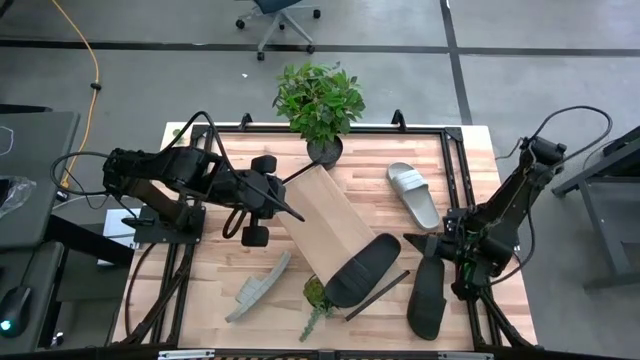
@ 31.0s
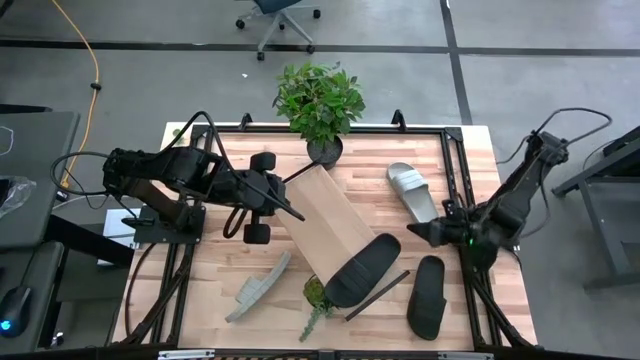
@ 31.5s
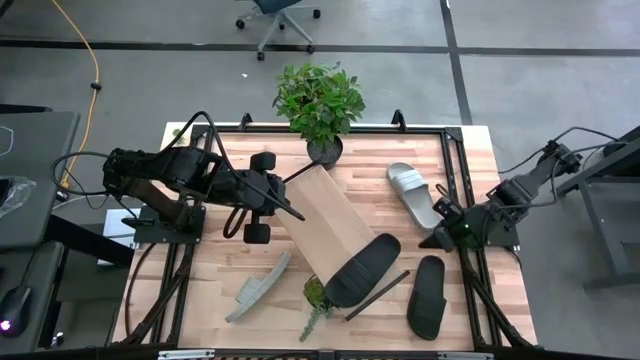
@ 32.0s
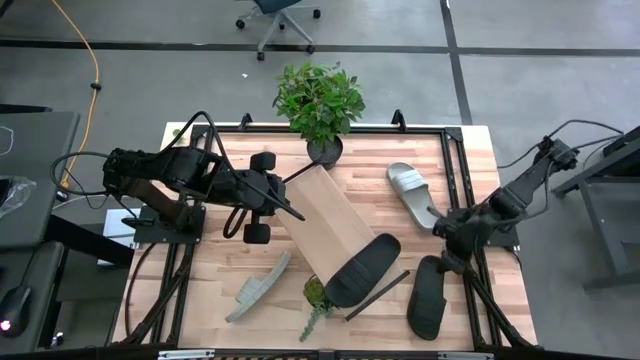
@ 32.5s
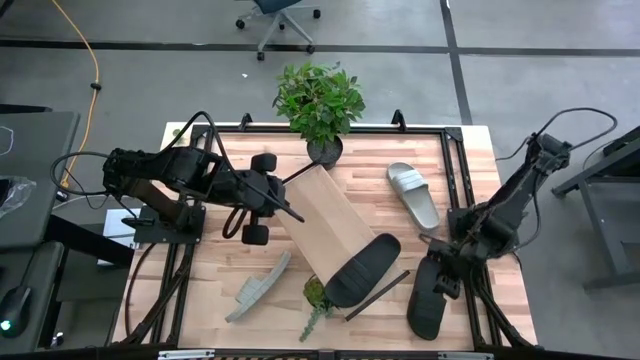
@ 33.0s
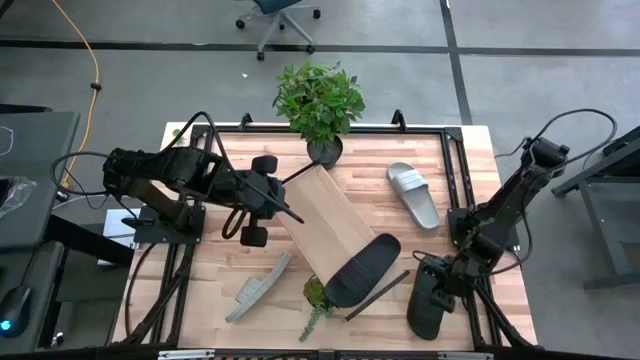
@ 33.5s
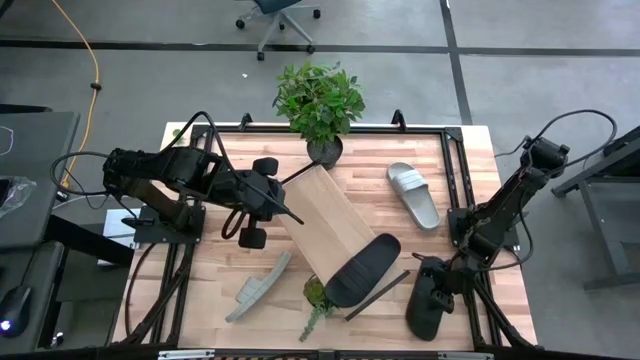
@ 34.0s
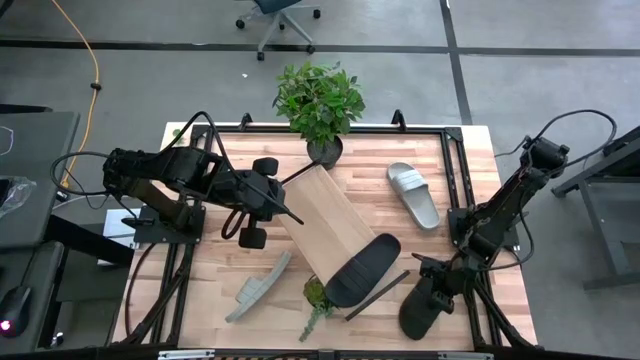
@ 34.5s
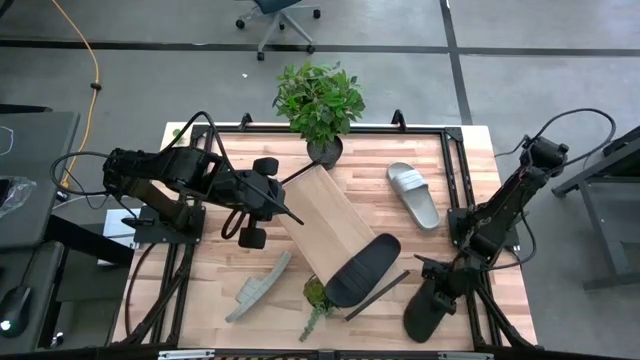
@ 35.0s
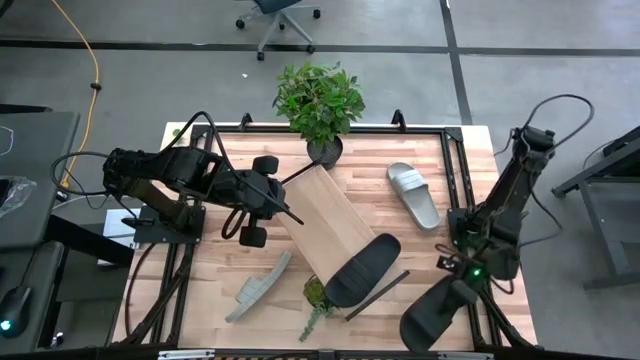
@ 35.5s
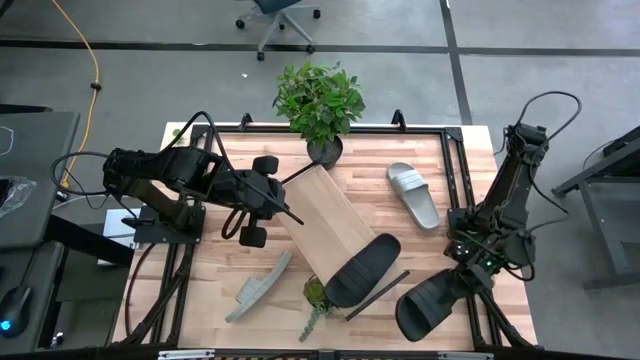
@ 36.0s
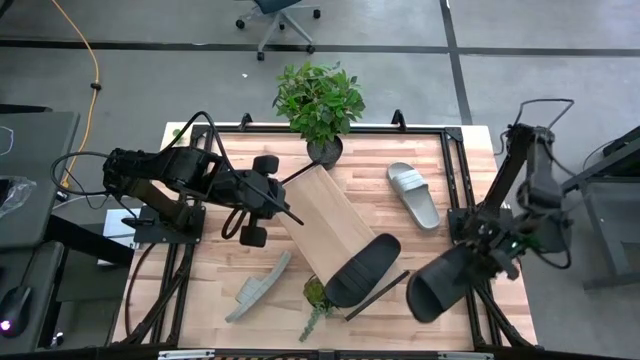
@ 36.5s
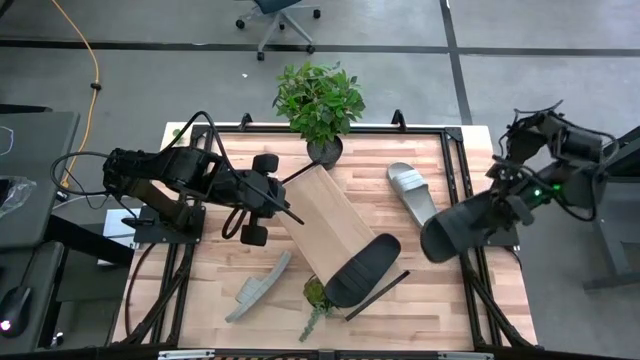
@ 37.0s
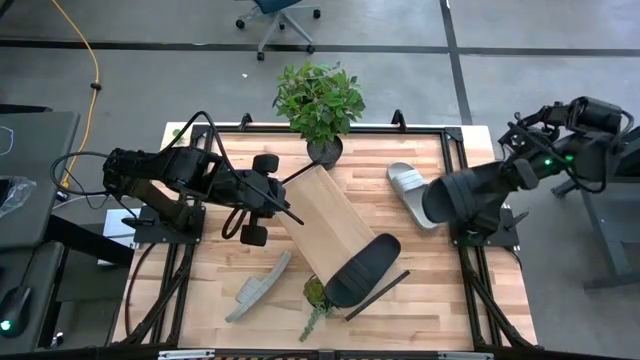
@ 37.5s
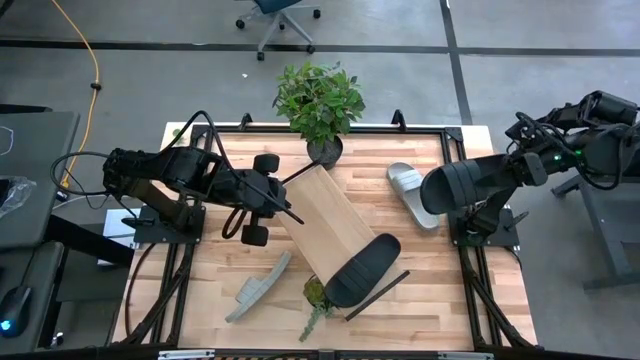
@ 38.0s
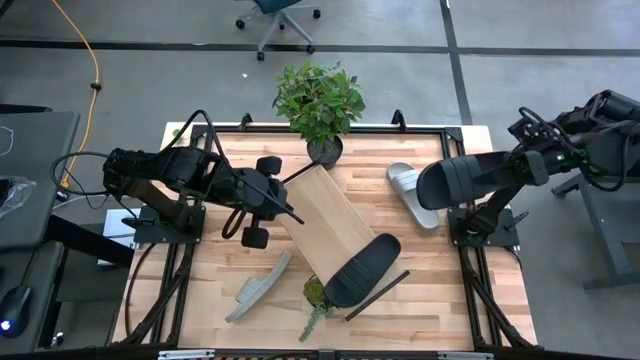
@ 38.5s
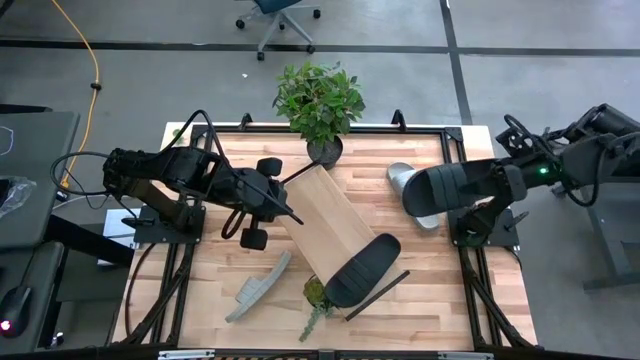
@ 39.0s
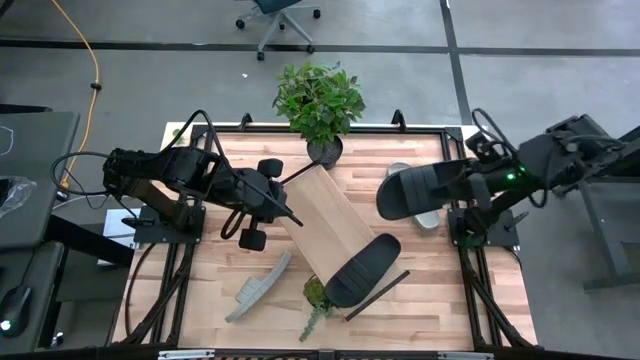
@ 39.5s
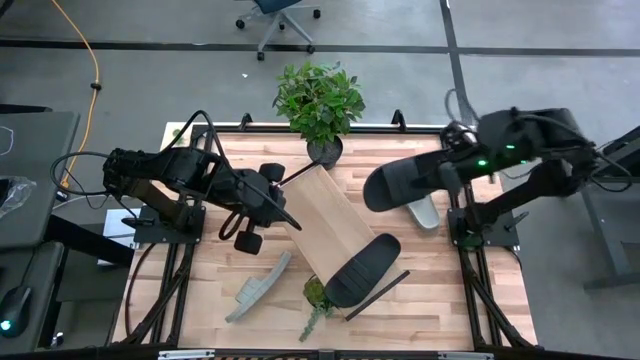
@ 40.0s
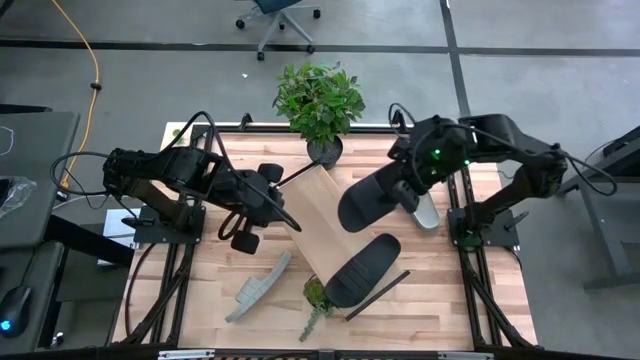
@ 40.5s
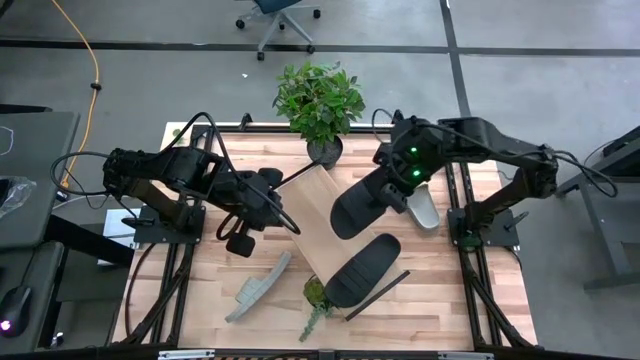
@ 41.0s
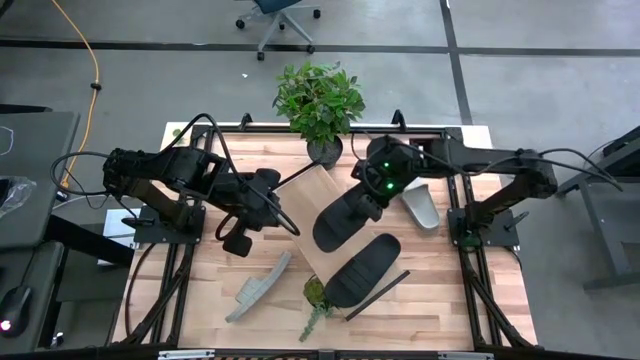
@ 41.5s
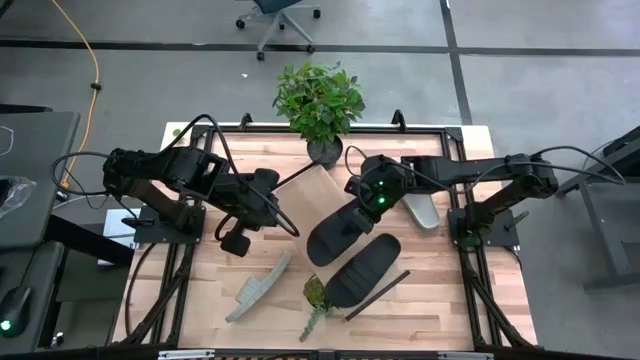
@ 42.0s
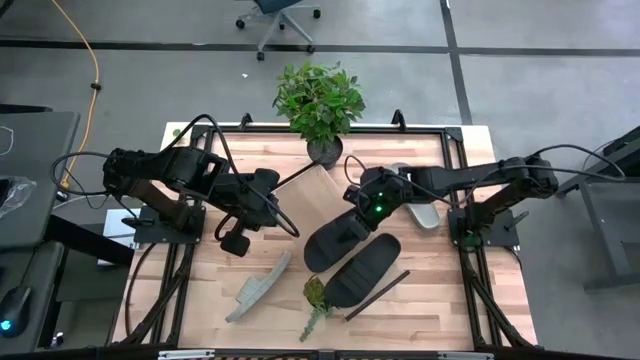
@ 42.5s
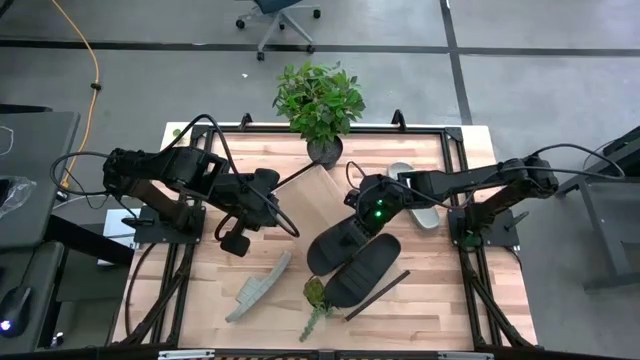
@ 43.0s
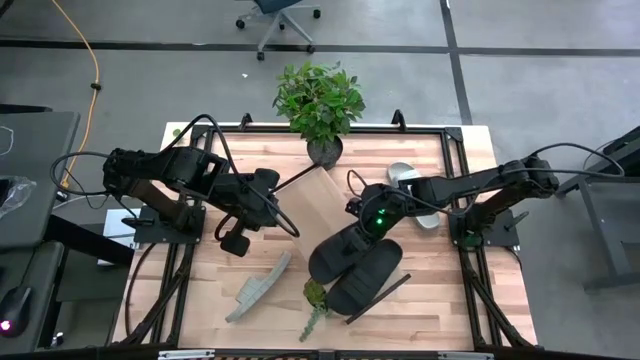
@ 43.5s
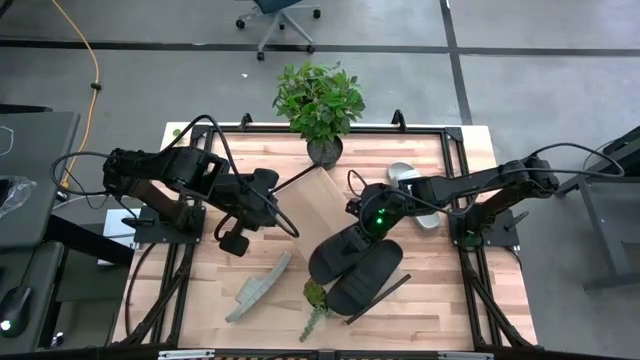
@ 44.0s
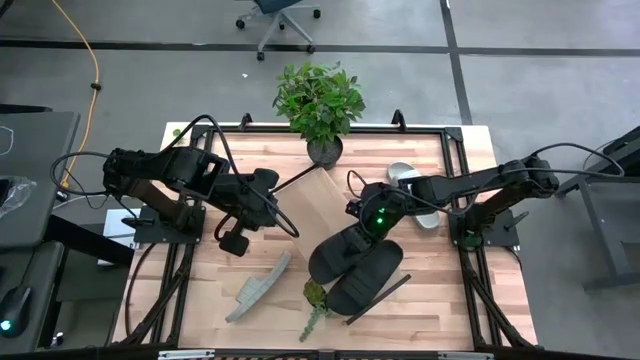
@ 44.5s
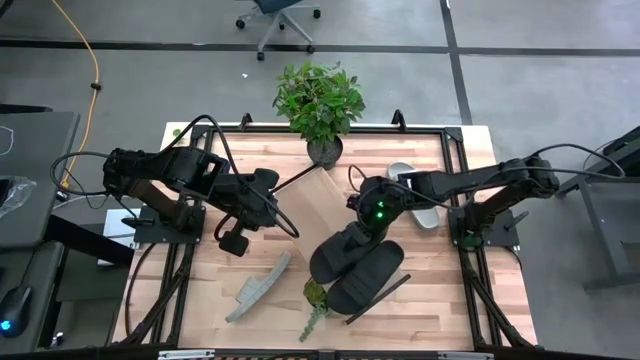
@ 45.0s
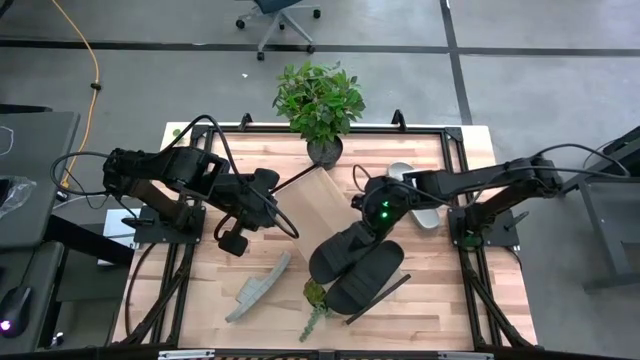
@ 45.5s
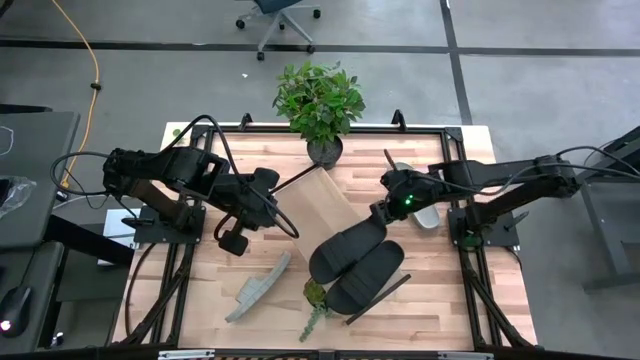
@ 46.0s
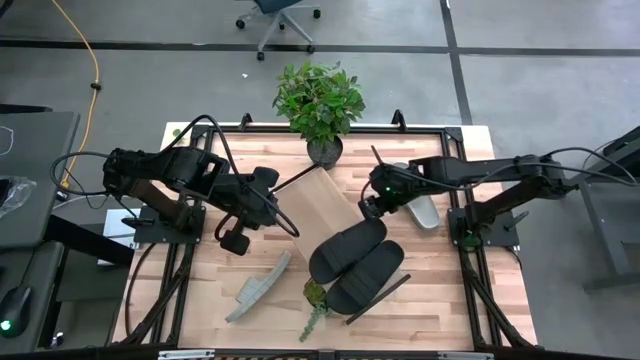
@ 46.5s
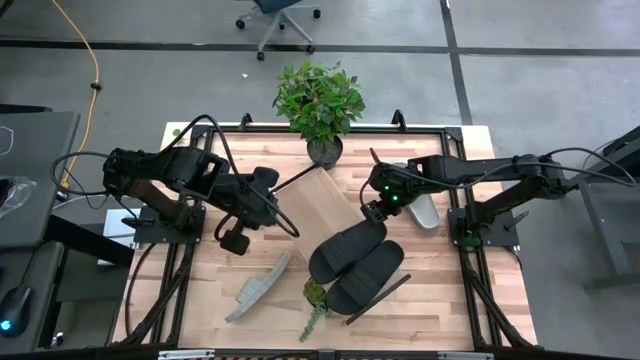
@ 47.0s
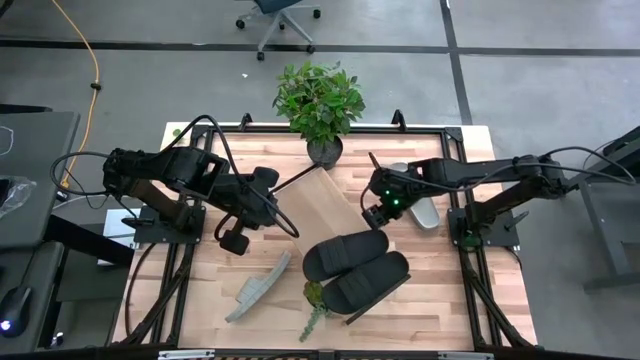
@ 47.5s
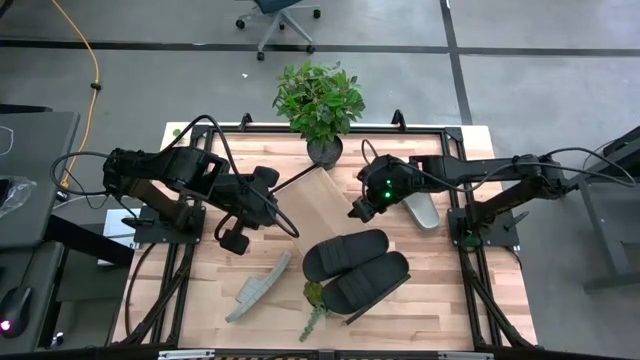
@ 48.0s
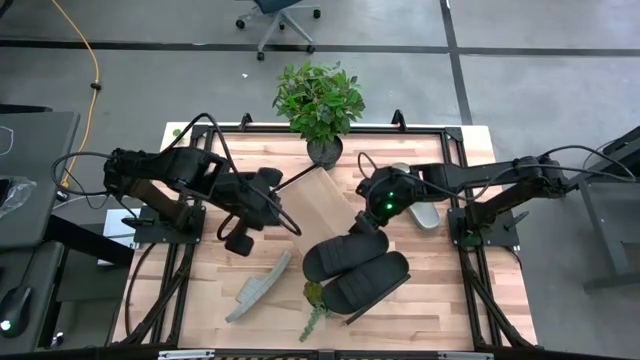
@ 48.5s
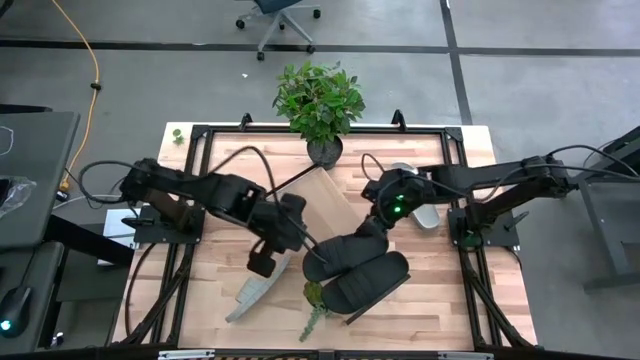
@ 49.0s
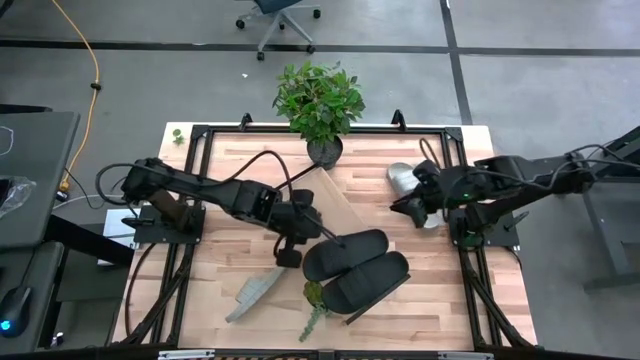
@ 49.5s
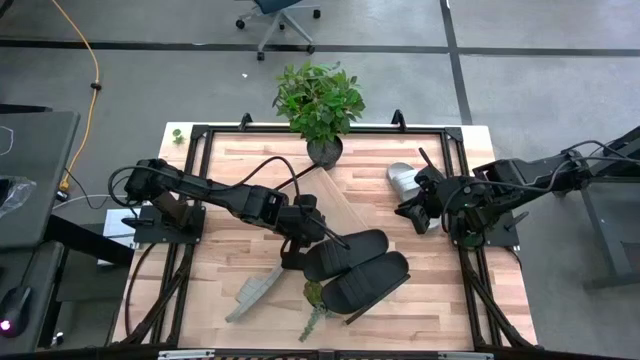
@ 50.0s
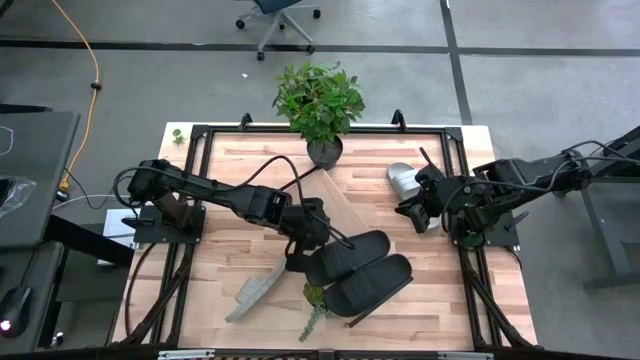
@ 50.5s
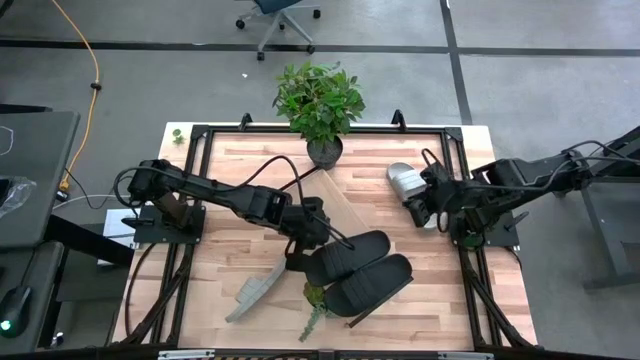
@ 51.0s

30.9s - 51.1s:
Task: Pick and place slides into the shelf
Put the black slide on the shelf

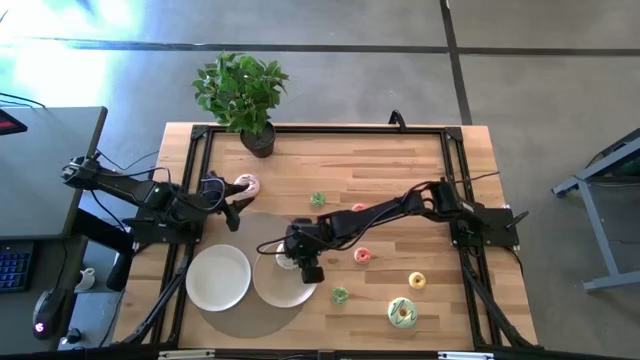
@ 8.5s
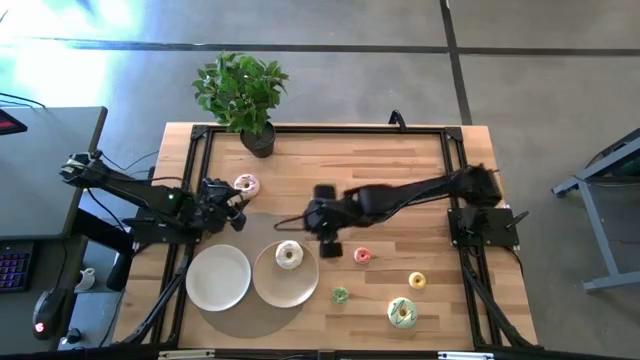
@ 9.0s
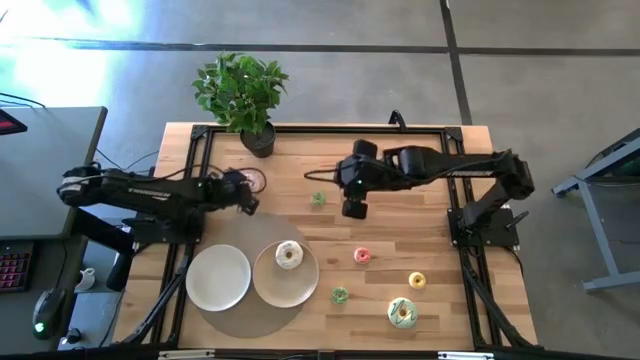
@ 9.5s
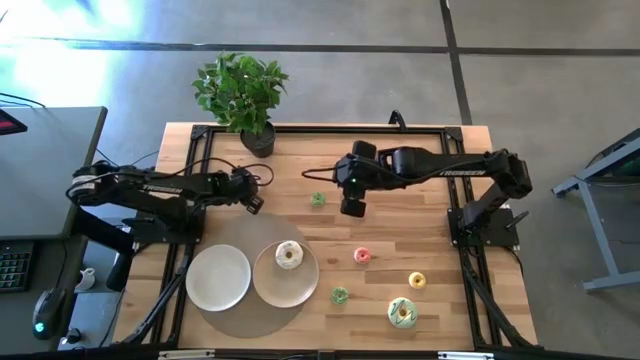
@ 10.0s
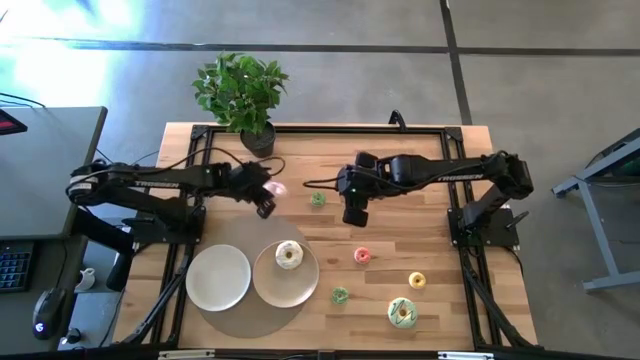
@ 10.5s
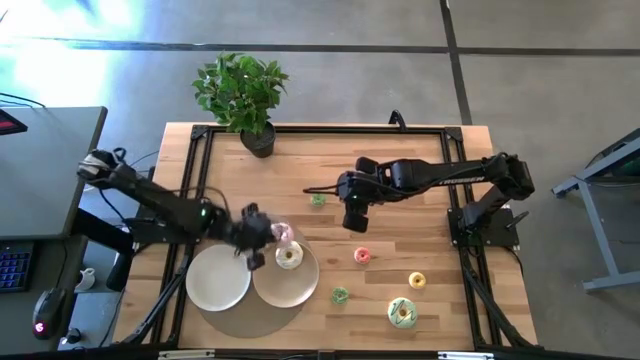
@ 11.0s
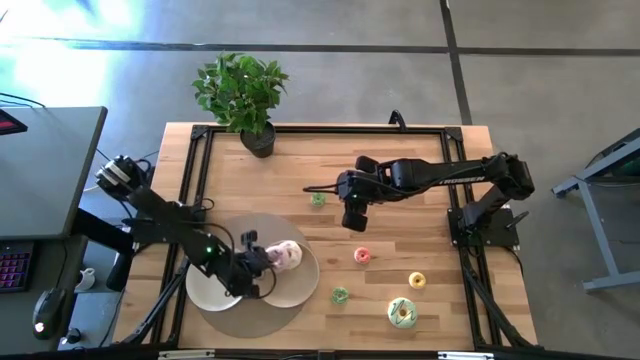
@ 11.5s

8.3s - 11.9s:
Task: Pick & Place donuts
Put the big purple donut on the brown plate
